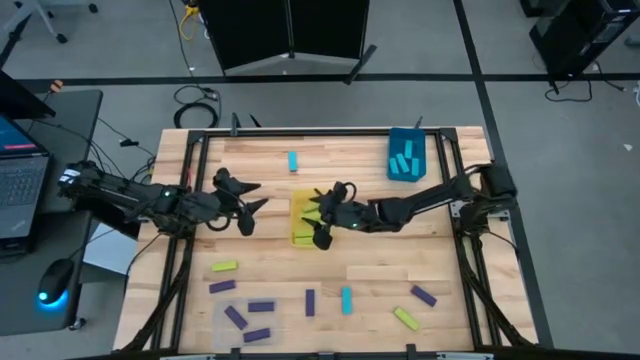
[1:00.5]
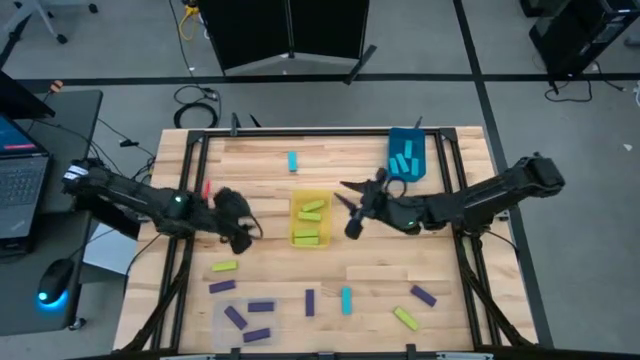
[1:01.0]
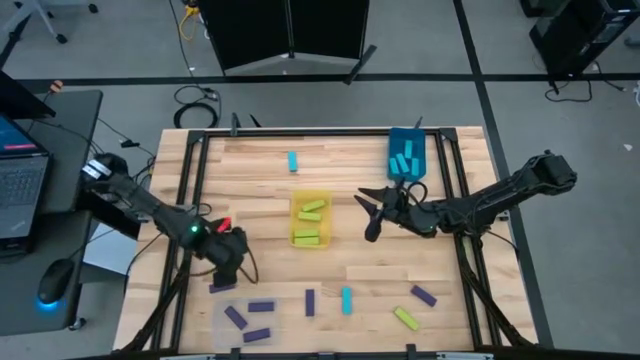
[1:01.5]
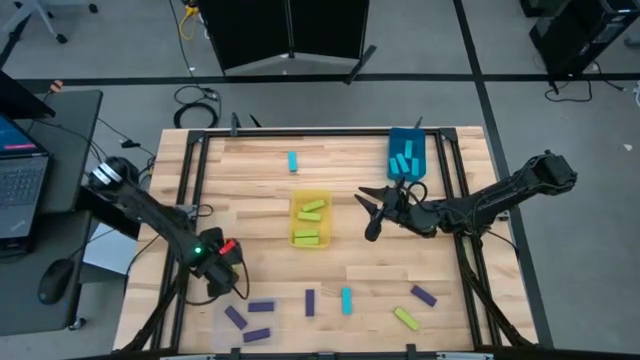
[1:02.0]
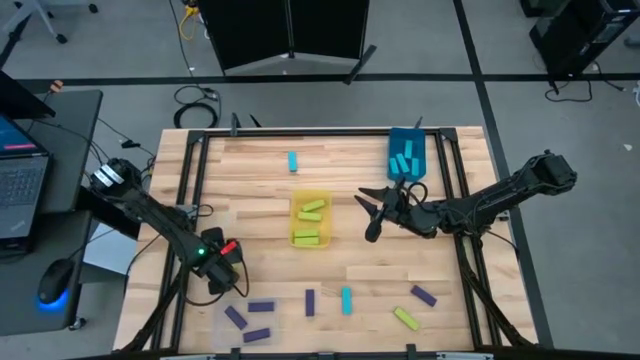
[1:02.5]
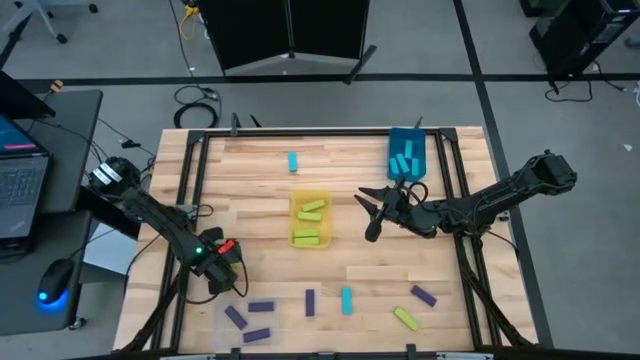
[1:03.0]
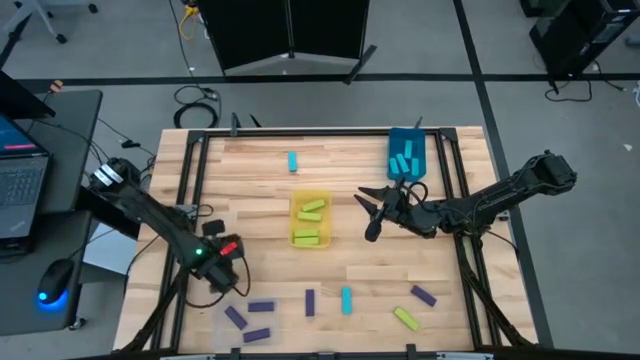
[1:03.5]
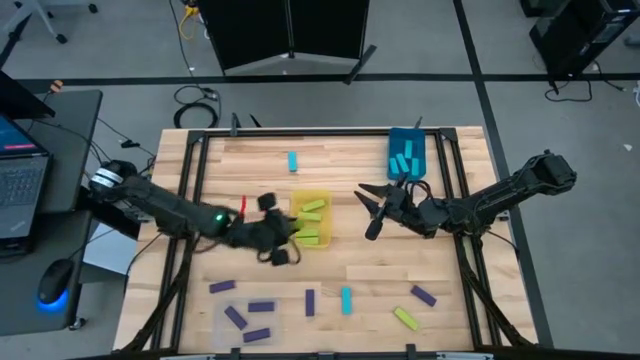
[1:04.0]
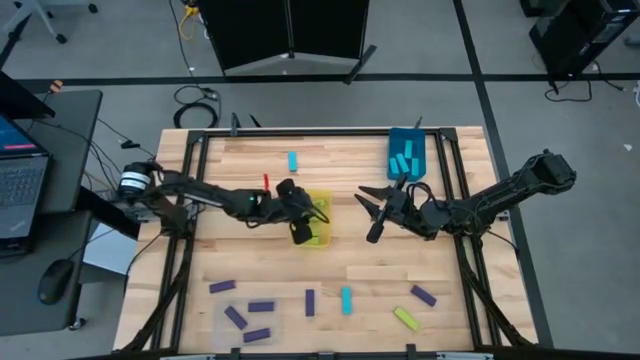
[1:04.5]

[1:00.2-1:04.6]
Task: Sort blocks
Put the light green block into the yellow bin

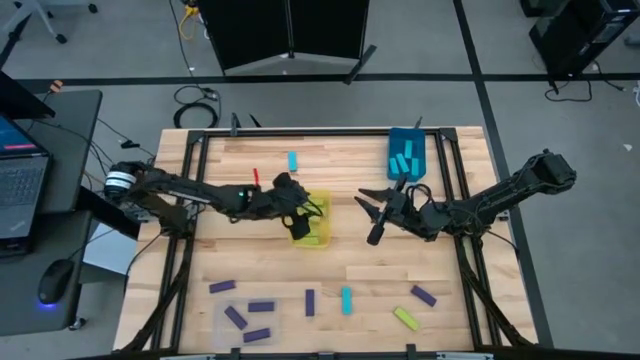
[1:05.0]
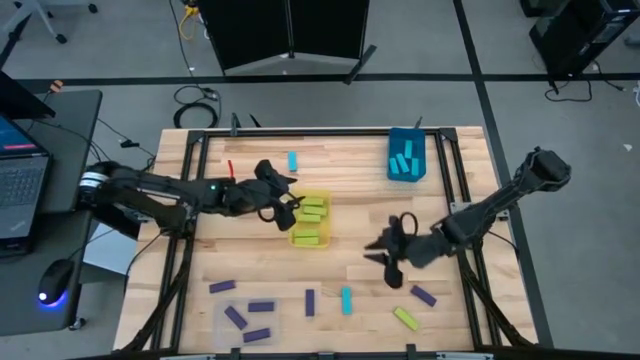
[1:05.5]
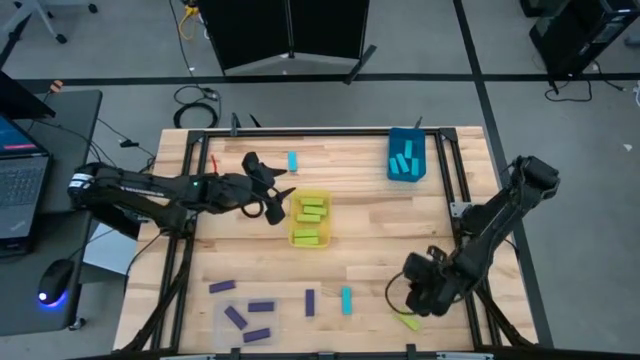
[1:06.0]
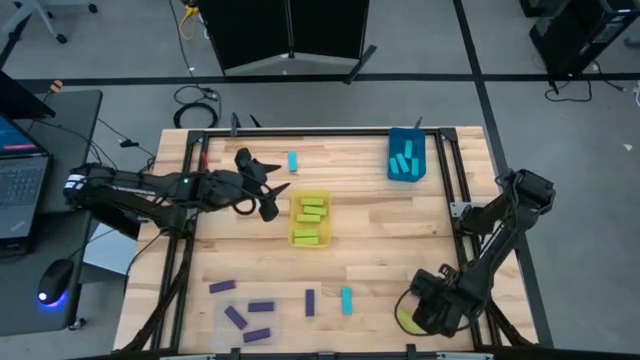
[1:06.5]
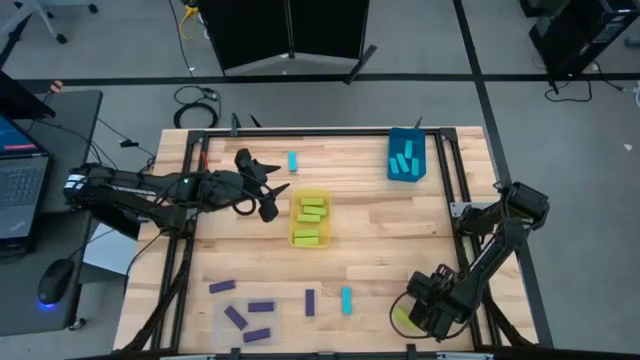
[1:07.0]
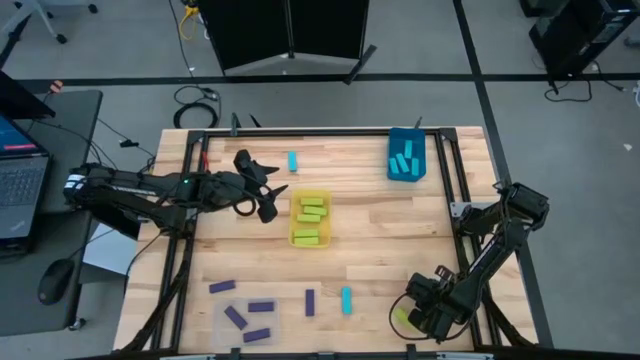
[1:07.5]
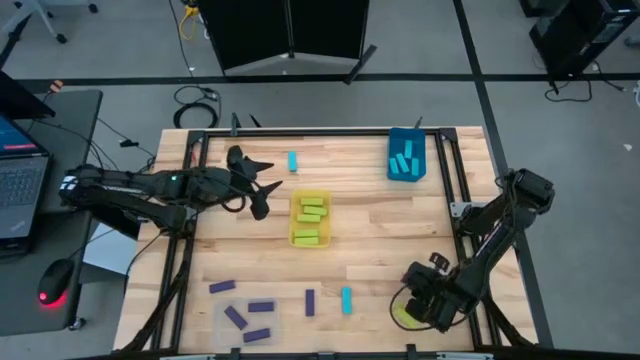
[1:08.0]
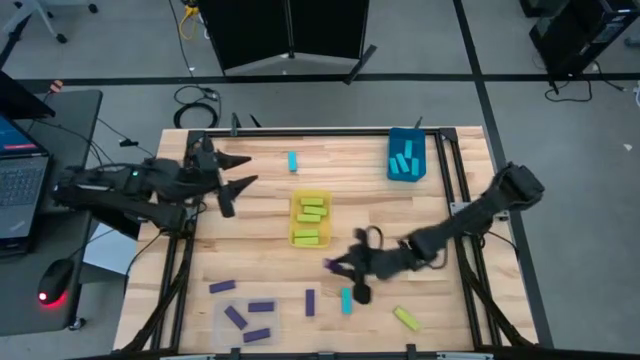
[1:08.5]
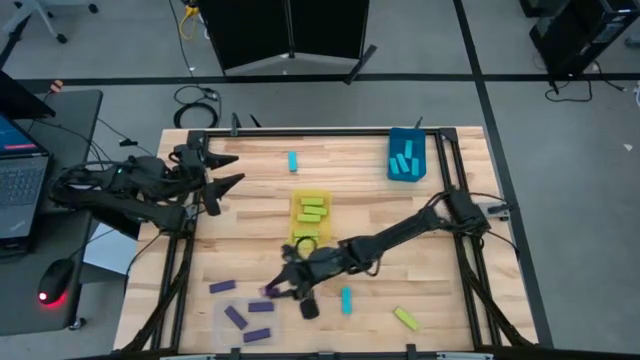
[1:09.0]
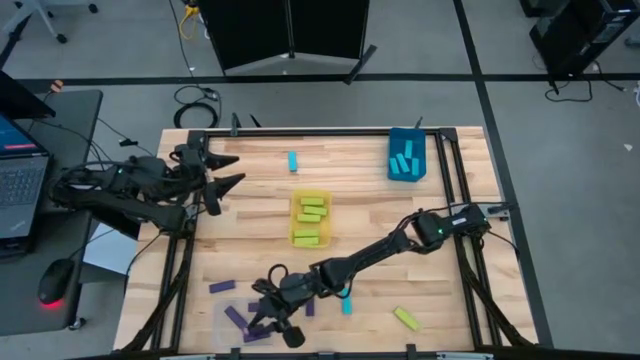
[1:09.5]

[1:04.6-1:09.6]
Put the purple block into the transparent bin

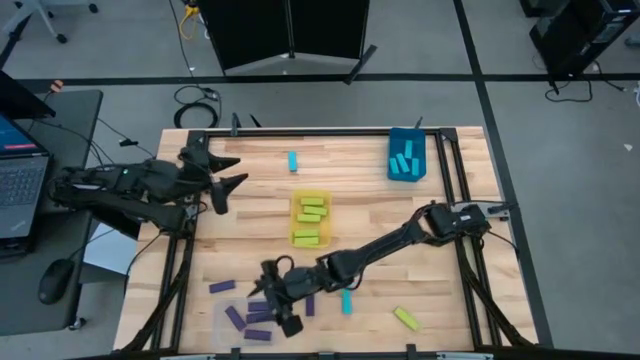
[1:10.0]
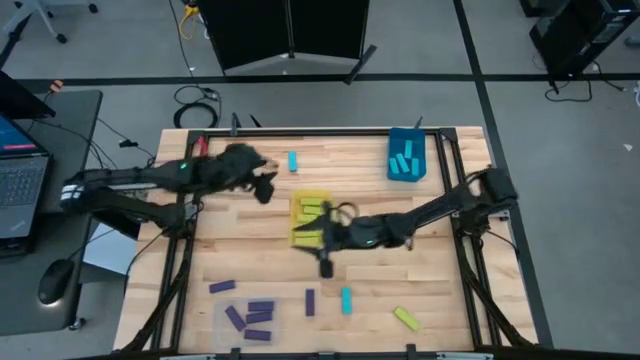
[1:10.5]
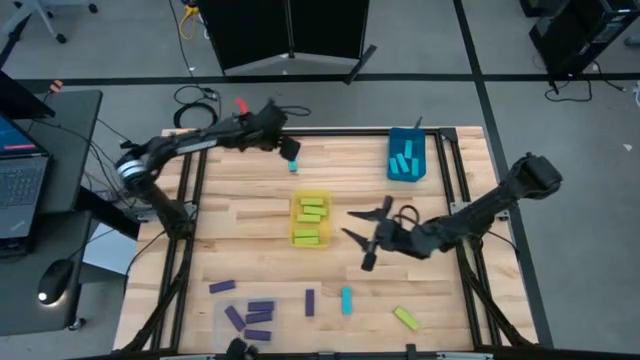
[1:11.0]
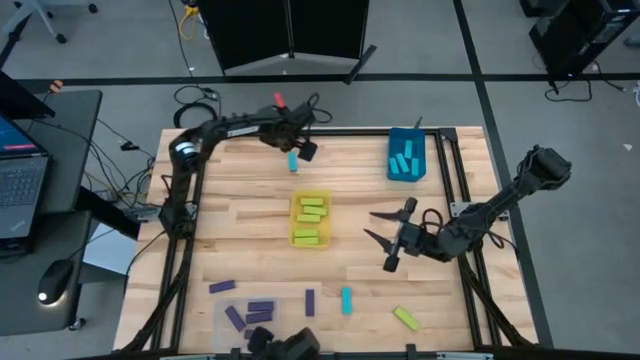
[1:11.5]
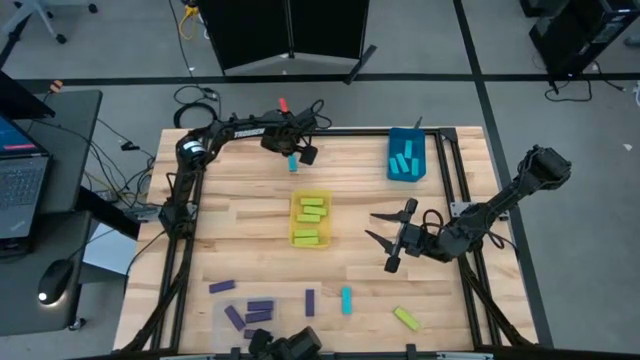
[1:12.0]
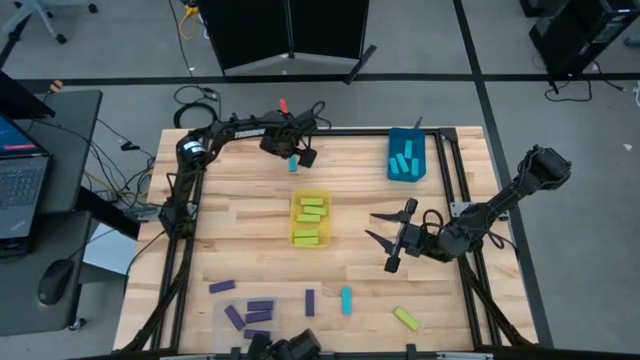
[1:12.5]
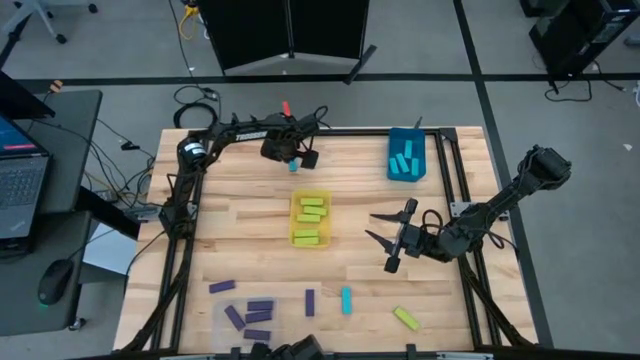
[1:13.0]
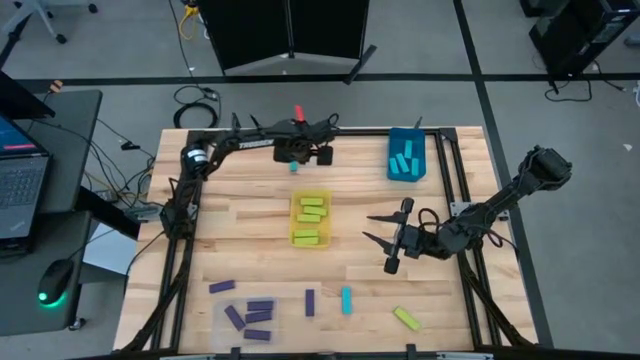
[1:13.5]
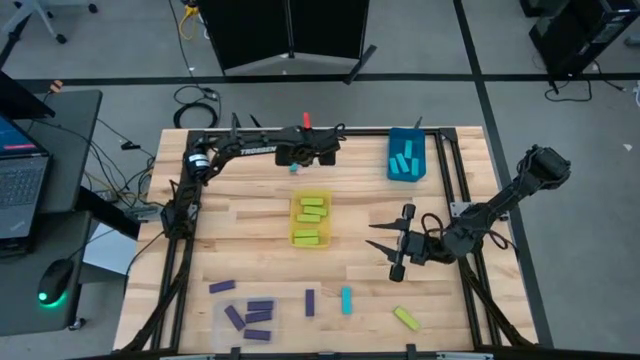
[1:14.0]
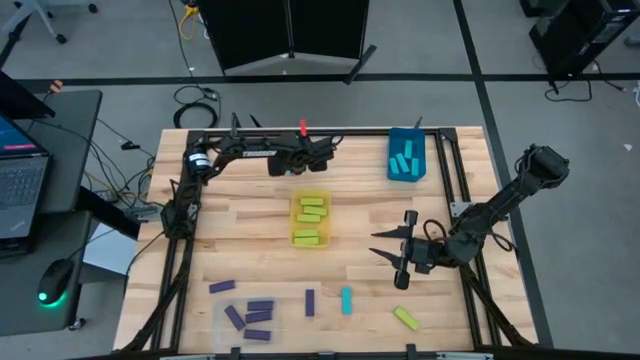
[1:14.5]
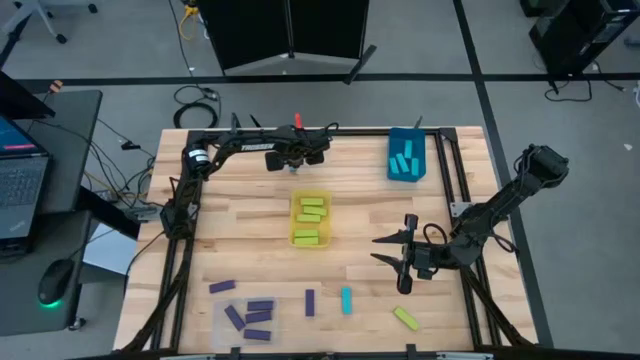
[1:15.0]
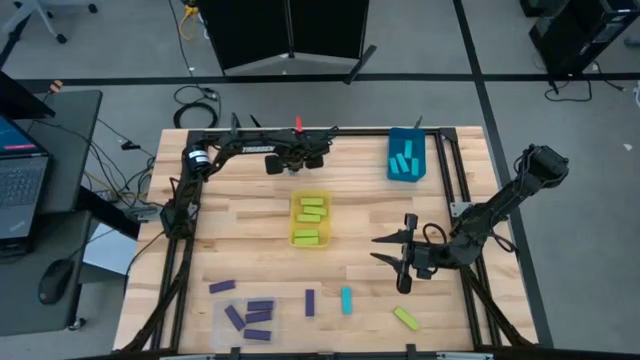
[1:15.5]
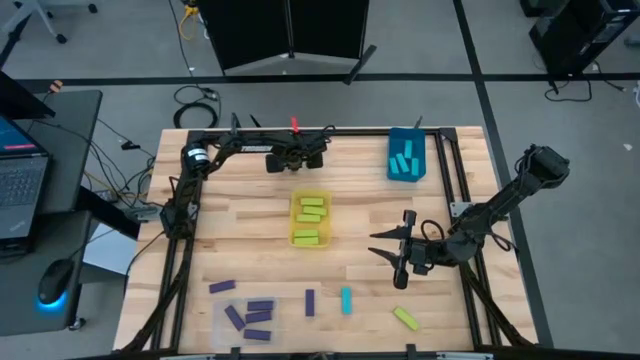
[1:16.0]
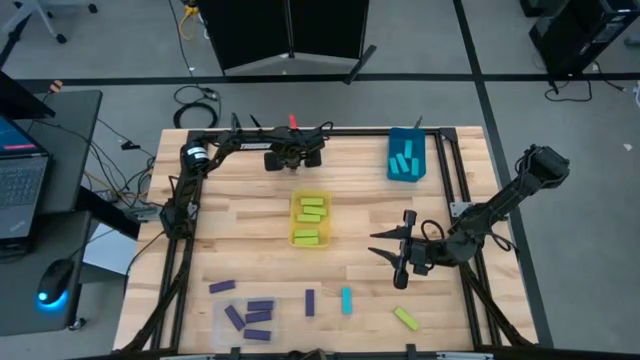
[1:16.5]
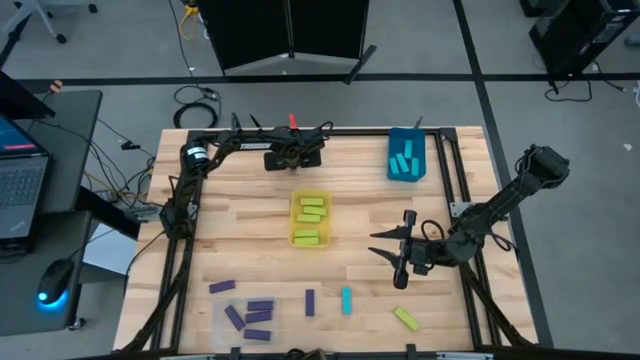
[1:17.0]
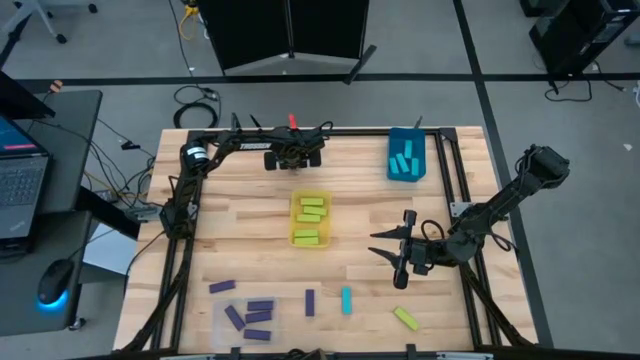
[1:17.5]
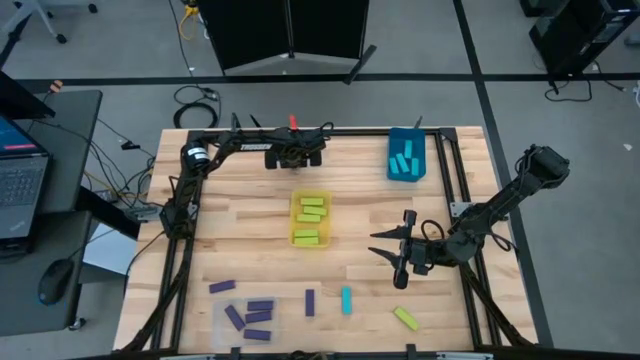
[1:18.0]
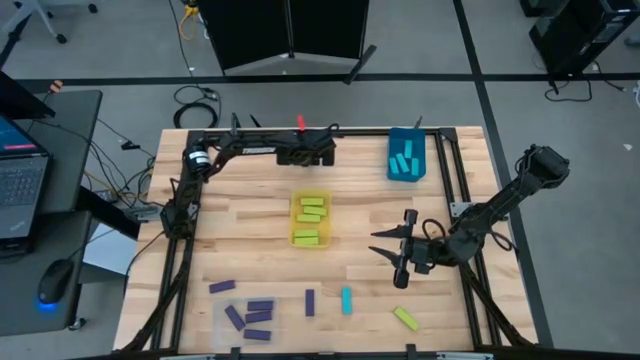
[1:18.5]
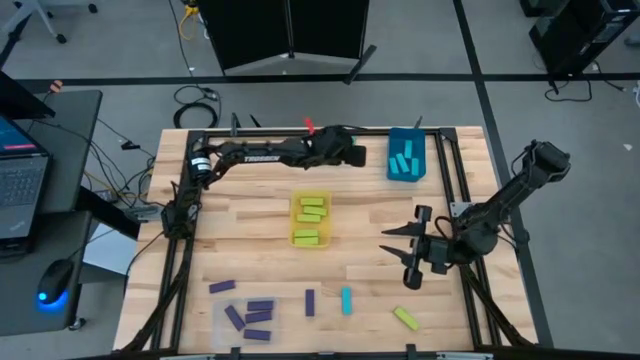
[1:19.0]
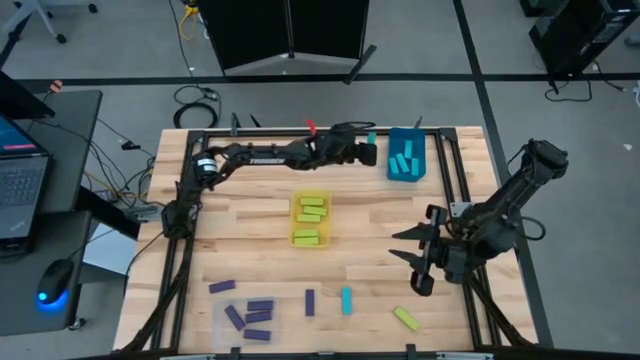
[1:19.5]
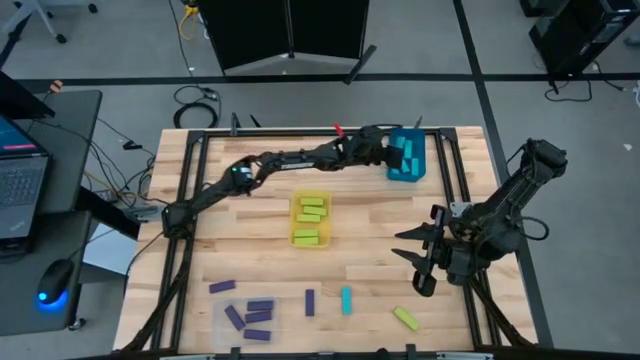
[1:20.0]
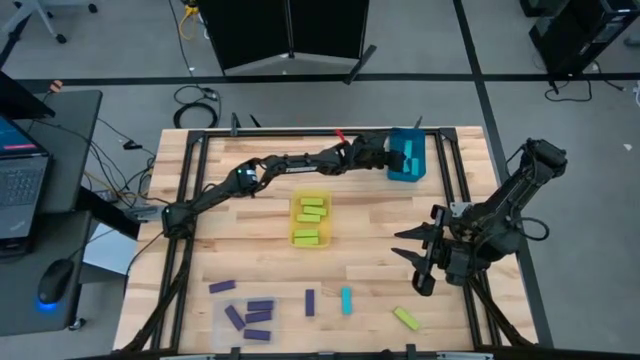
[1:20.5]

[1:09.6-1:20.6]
Put the light blue block into the blue bin
